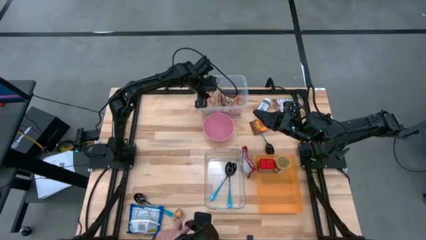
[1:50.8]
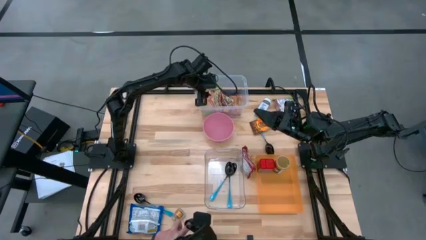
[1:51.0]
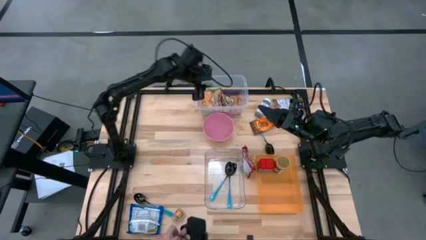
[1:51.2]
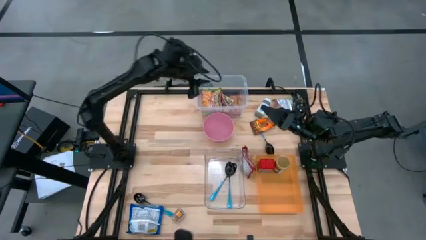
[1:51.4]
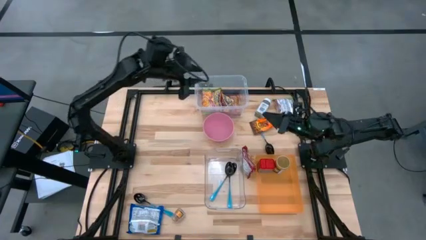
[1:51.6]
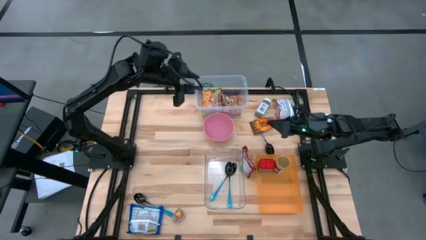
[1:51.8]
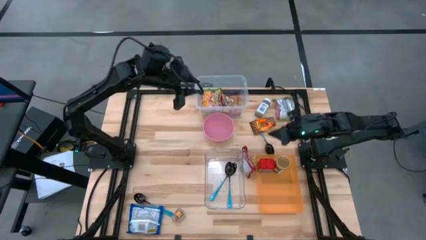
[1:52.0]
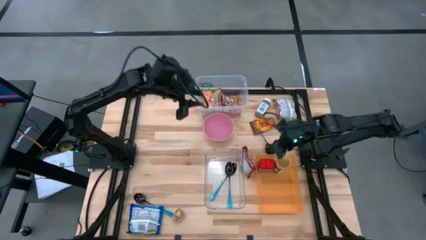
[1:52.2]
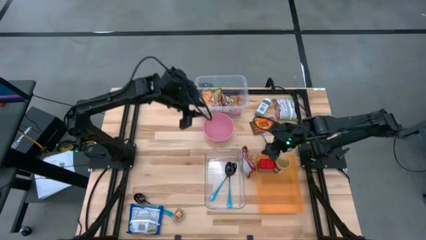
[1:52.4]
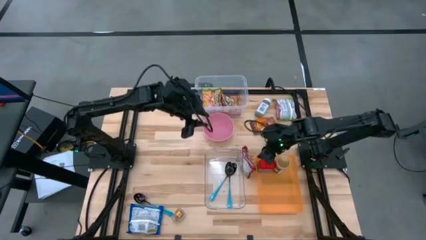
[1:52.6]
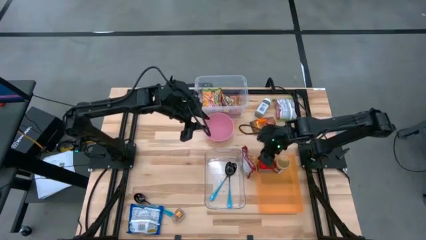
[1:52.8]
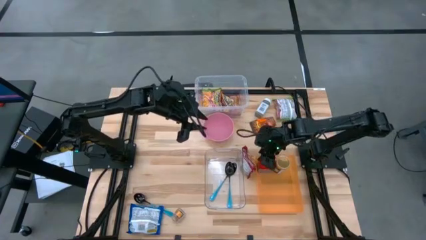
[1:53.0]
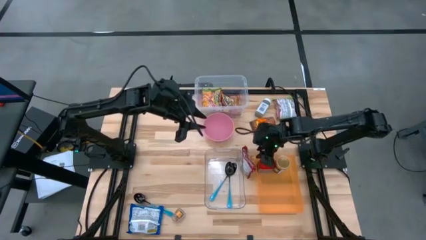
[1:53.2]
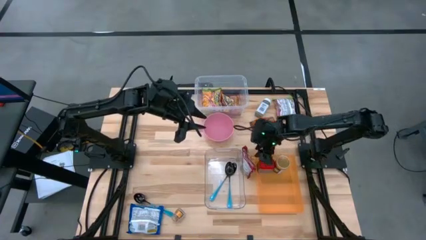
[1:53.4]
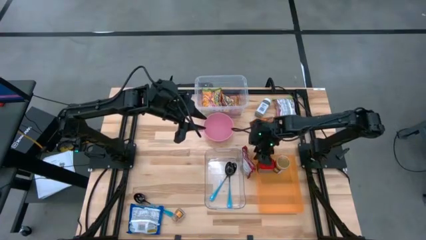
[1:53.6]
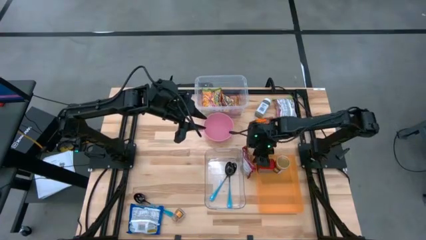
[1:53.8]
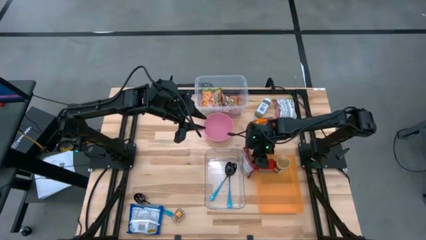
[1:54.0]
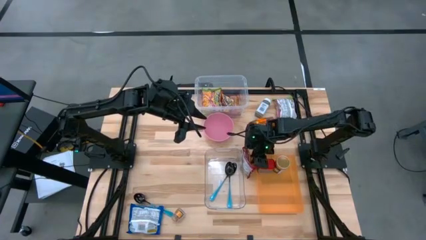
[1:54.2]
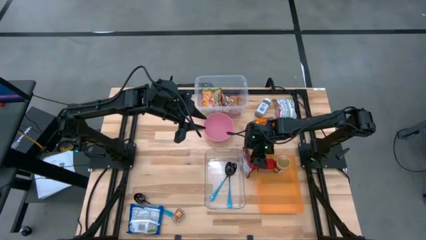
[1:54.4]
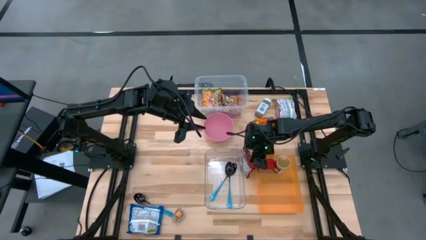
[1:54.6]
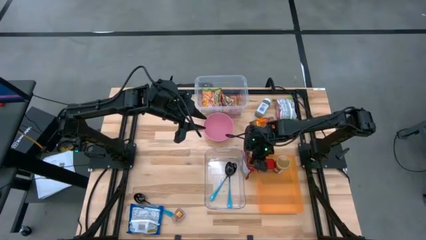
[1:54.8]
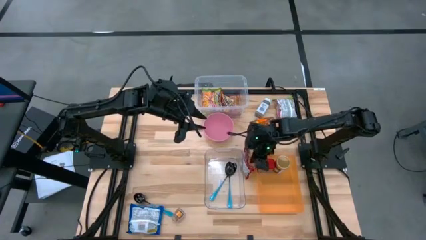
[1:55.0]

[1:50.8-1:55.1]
Task: Pick & Place Food Item
Put the red noodle pack into the top transparent bin

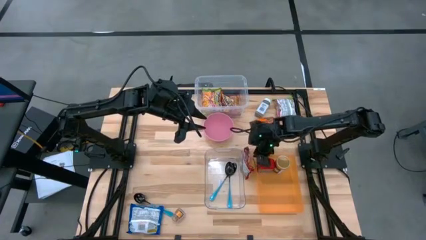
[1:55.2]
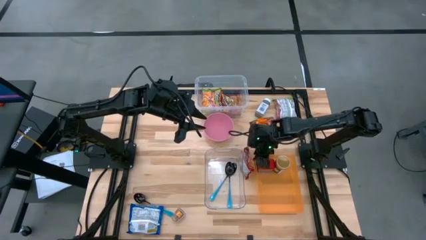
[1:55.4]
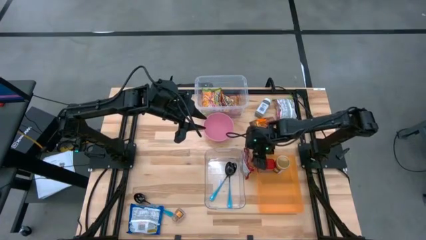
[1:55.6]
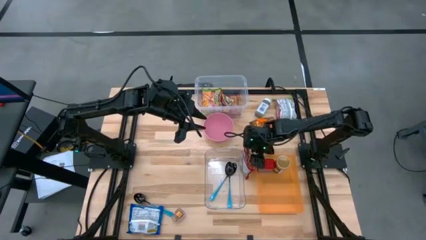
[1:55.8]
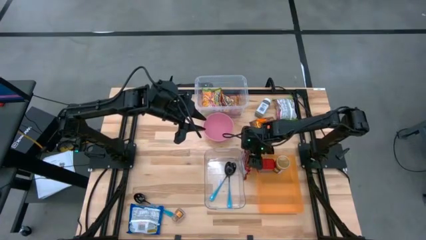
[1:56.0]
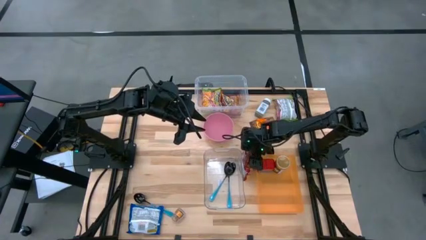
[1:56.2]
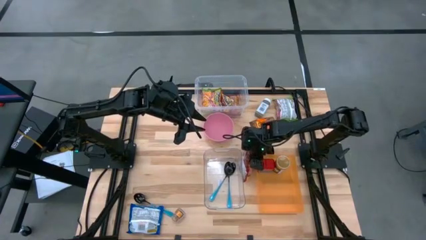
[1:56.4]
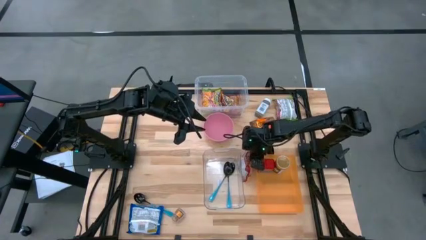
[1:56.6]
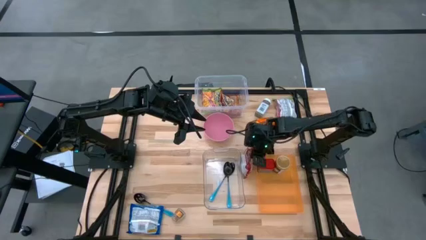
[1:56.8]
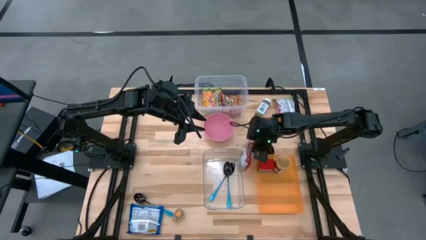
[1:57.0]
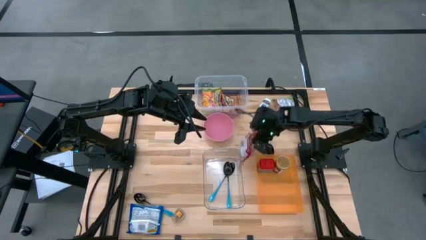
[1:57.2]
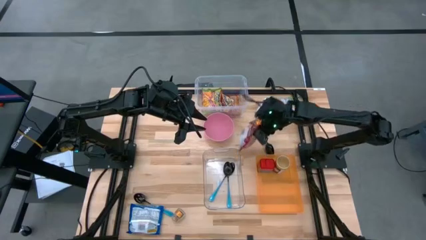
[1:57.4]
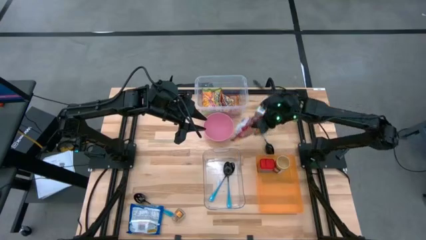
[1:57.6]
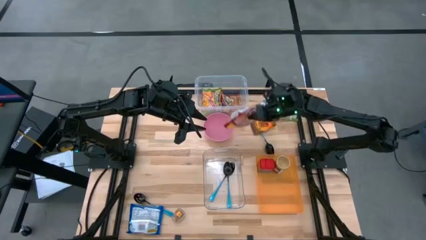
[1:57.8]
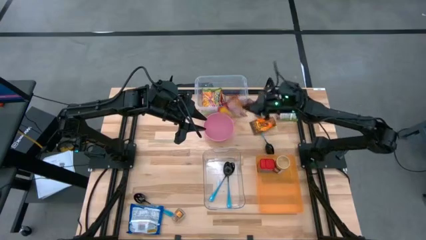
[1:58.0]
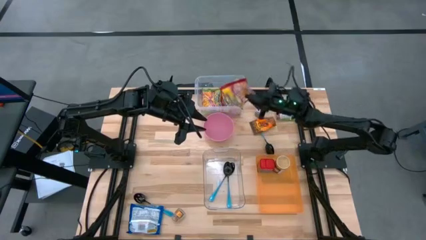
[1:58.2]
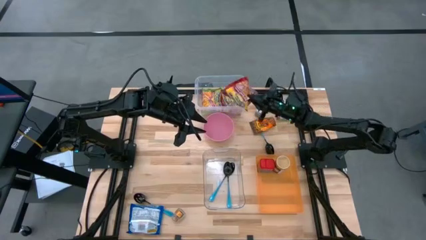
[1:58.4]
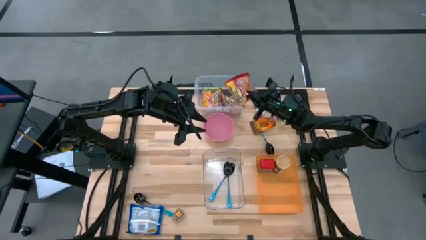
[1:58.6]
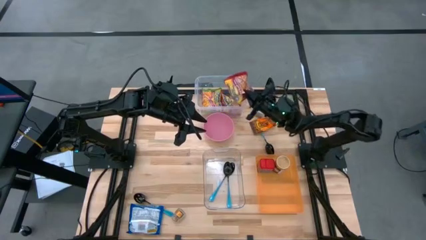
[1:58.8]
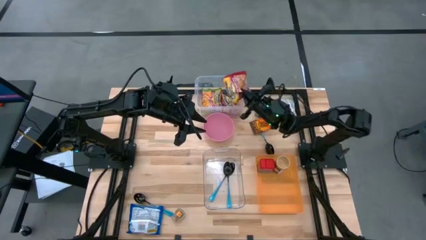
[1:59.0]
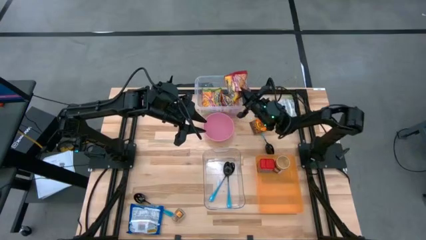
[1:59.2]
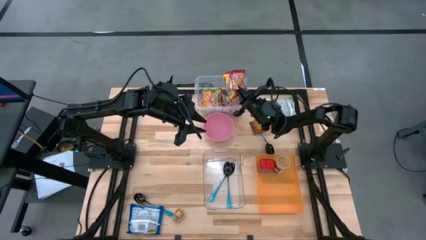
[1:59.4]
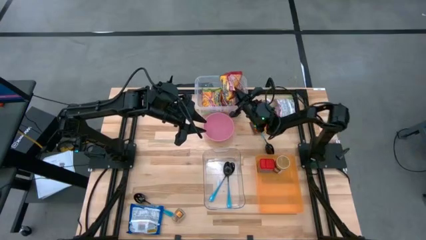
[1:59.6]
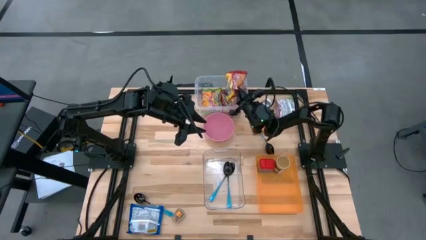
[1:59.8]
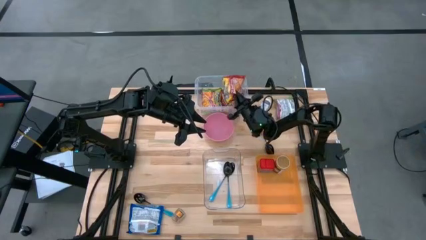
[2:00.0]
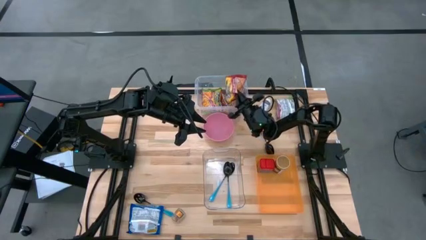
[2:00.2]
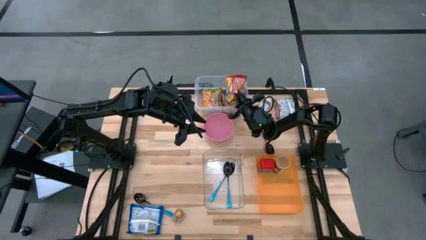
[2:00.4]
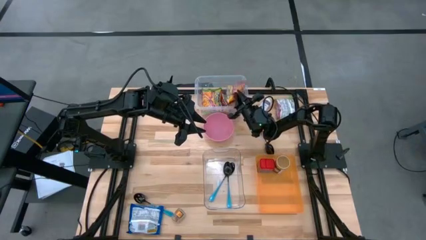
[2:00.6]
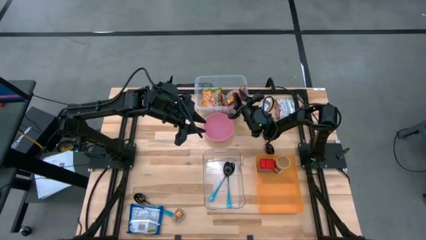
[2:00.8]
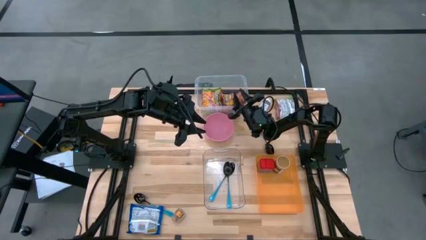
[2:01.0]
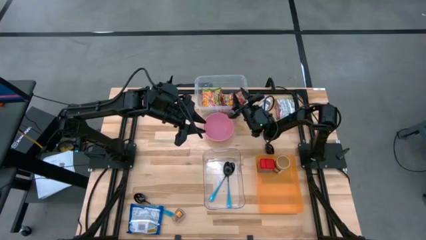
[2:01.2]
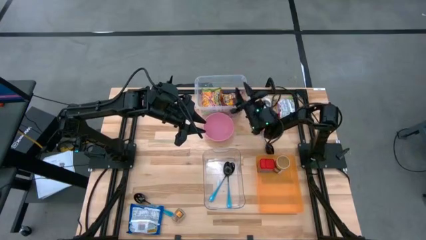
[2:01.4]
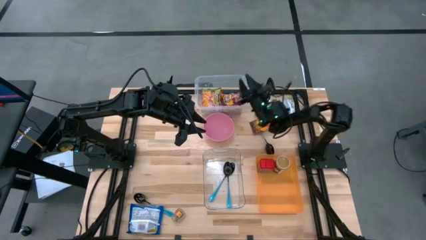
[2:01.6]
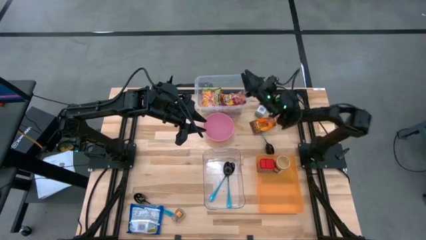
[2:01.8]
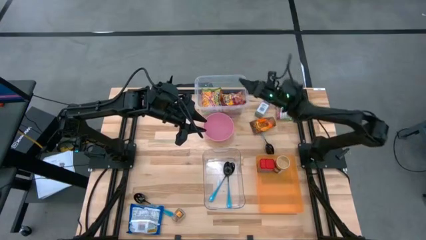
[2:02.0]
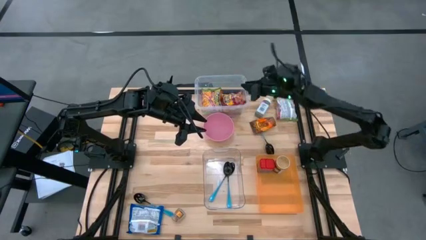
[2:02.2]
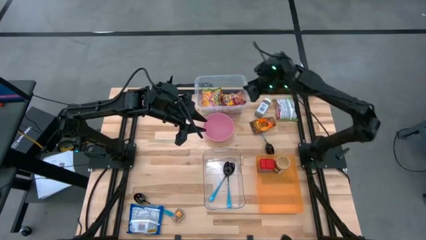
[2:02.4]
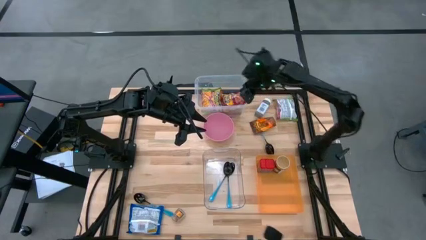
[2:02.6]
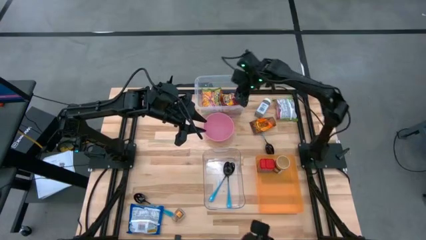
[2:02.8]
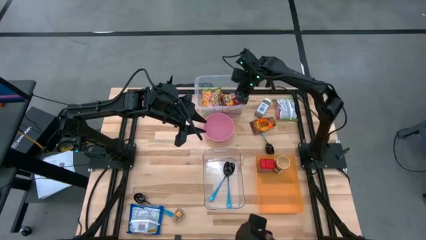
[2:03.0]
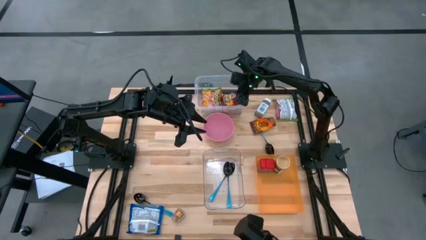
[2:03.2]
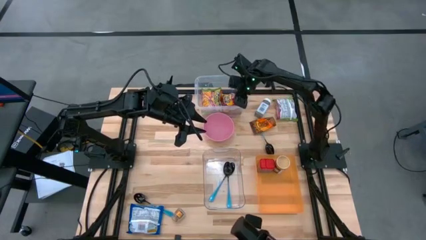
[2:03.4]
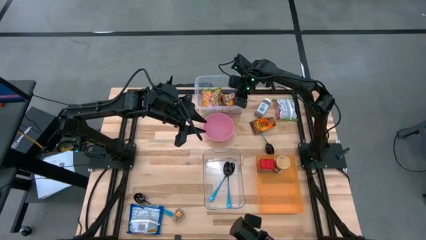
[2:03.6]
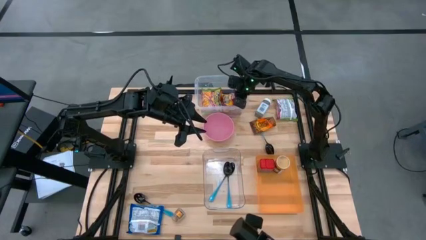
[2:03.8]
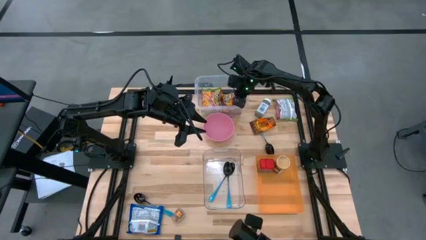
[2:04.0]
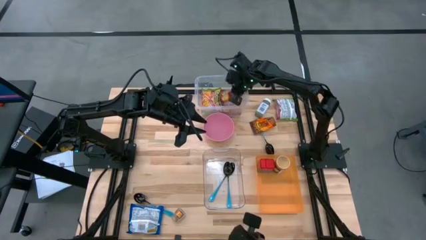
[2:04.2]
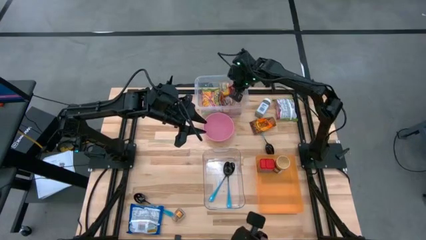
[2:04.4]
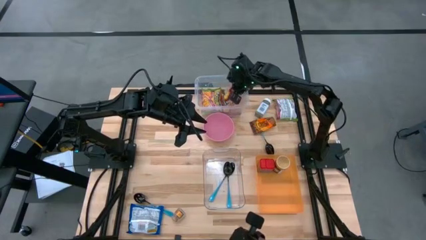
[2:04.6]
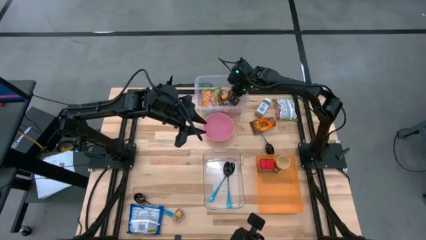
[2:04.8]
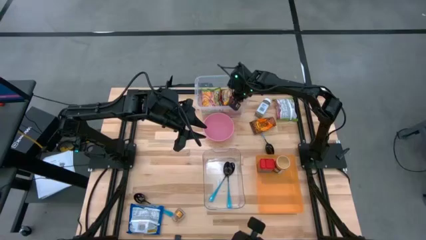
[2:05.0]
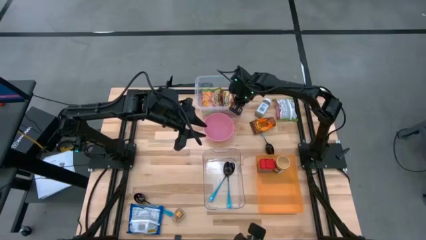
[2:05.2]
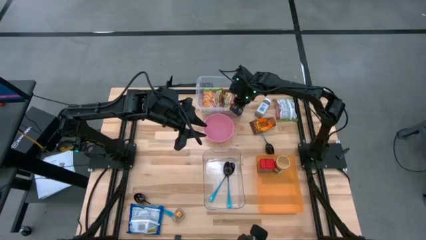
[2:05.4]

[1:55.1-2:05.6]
Put the red noodle pack into the top transparent bin

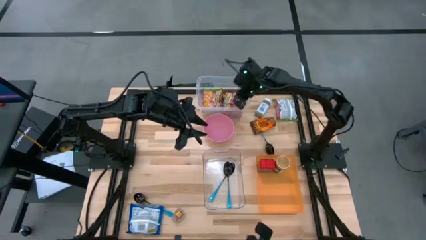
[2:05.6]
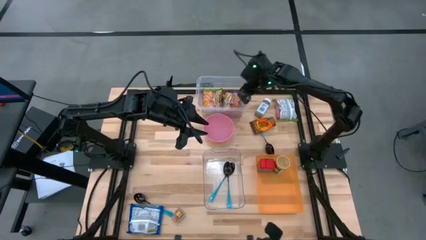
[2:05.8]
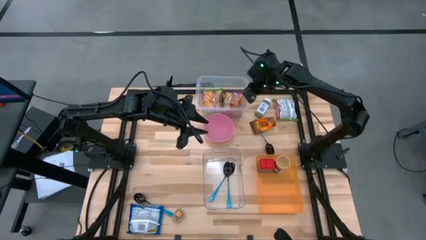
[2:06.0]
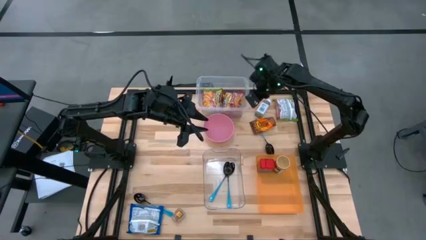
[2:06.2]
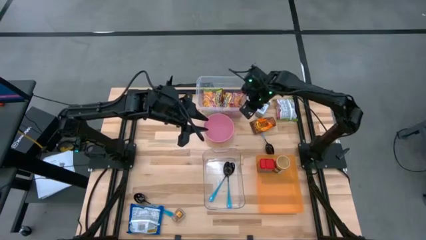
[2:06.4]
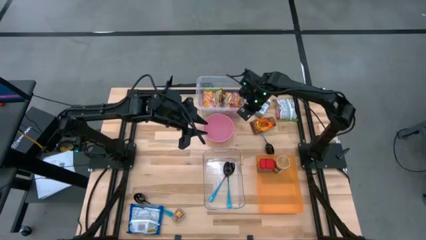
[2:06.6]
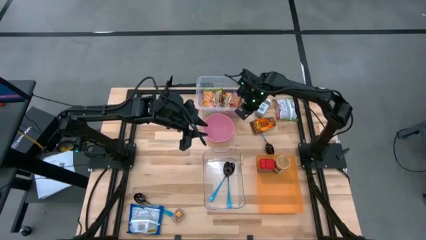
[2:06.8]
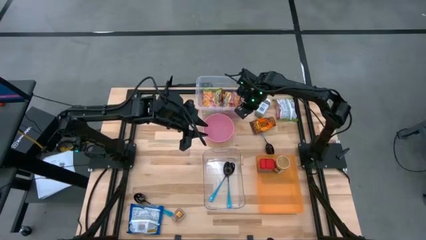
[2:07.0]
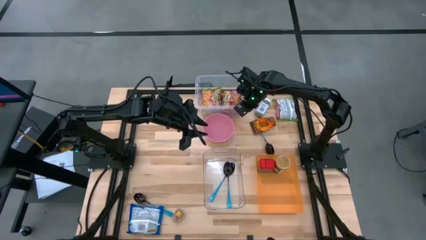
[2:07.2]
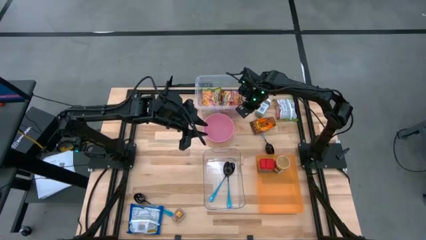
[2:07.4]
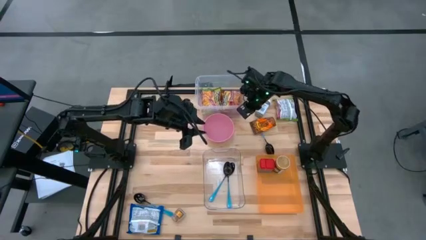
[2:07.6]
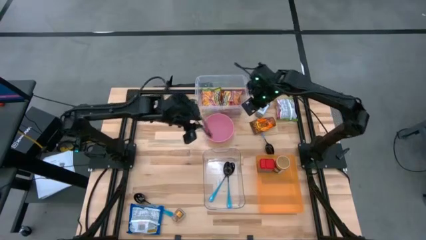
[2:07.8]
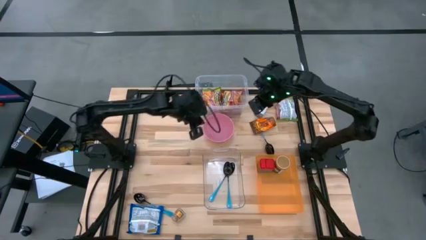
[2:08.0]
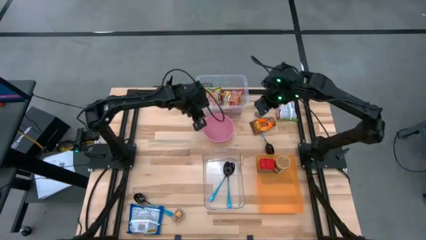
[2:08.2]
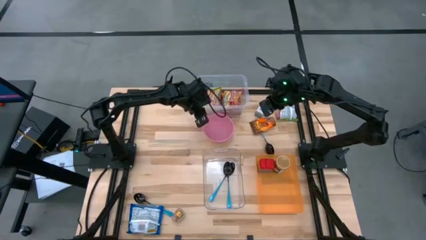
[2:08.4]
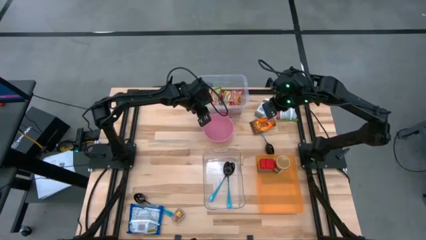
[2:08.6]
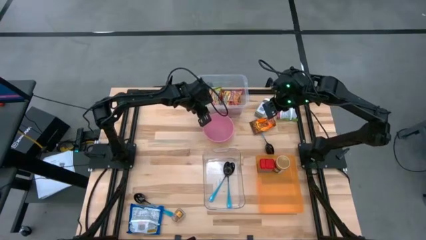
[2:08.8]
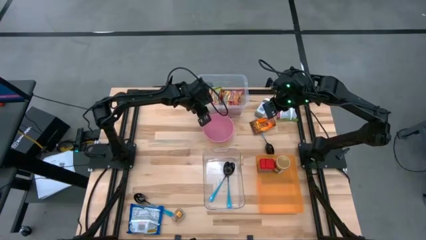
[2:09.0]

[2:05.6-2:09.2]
Adjust the top transparent bin
